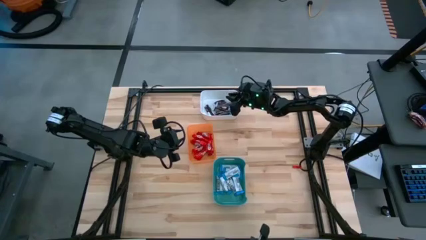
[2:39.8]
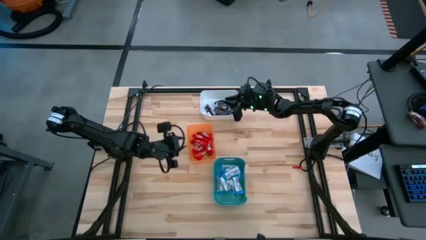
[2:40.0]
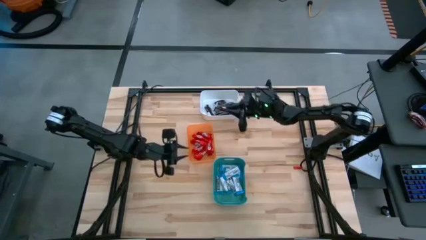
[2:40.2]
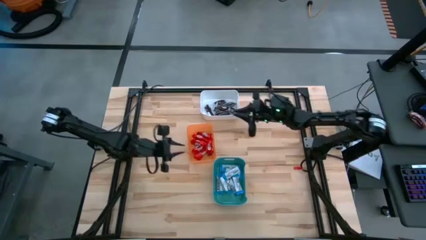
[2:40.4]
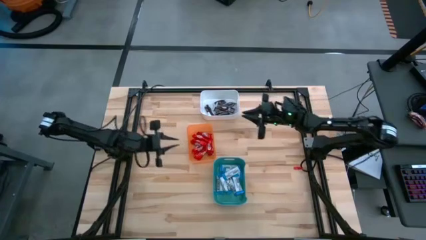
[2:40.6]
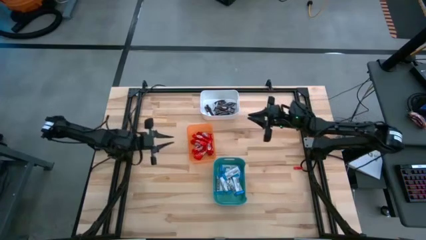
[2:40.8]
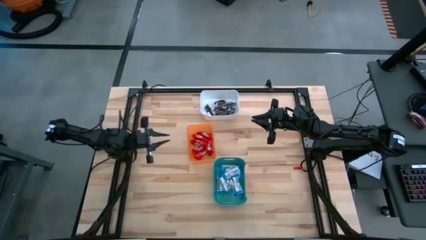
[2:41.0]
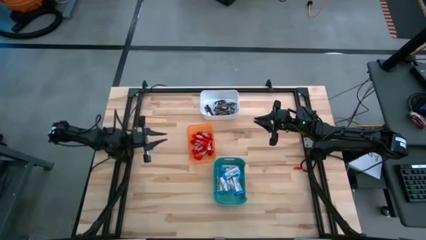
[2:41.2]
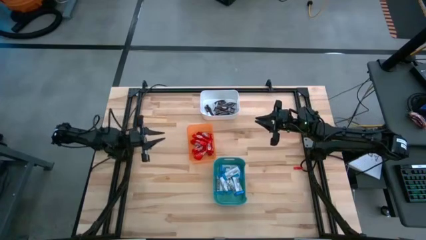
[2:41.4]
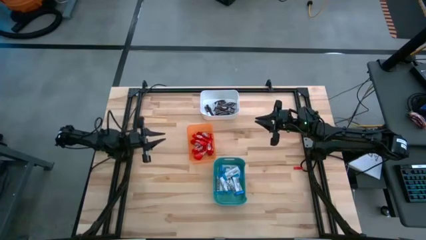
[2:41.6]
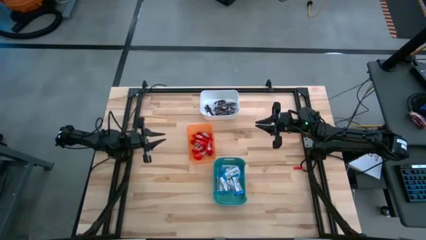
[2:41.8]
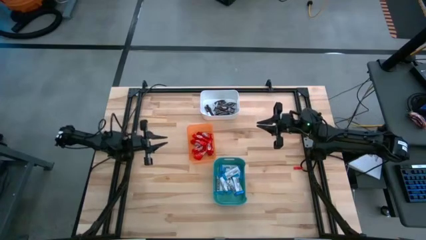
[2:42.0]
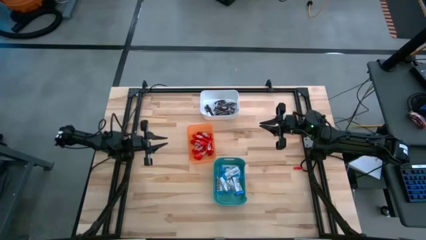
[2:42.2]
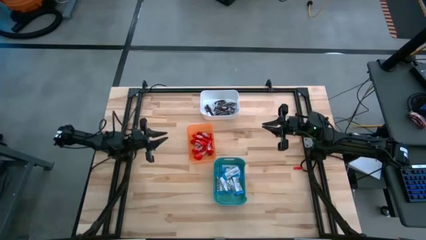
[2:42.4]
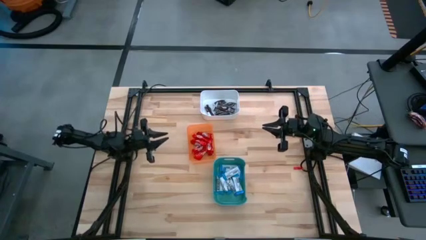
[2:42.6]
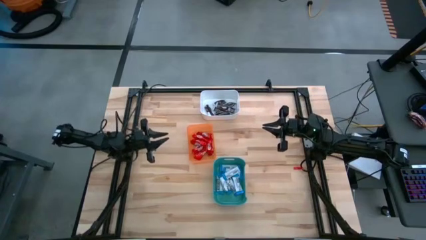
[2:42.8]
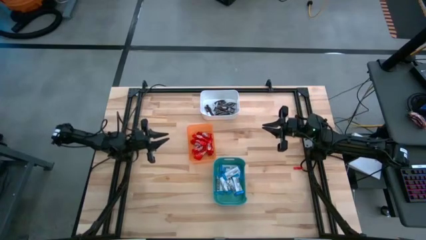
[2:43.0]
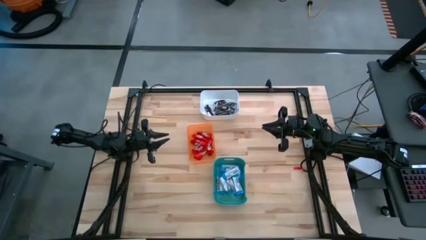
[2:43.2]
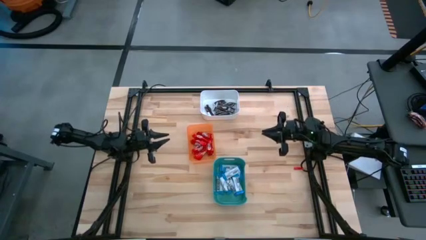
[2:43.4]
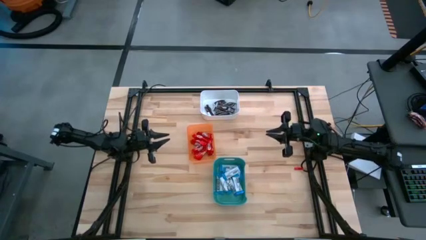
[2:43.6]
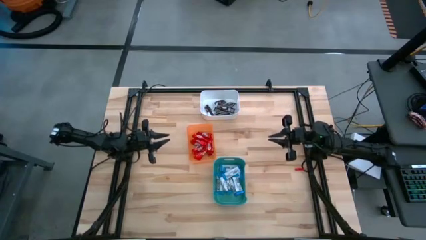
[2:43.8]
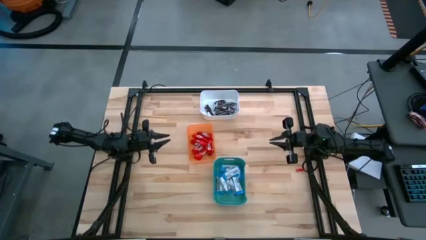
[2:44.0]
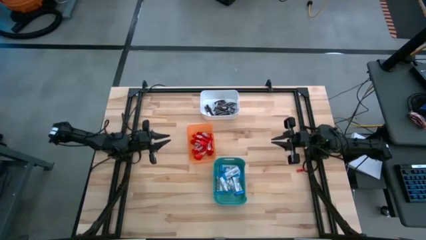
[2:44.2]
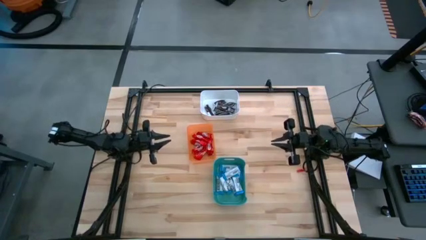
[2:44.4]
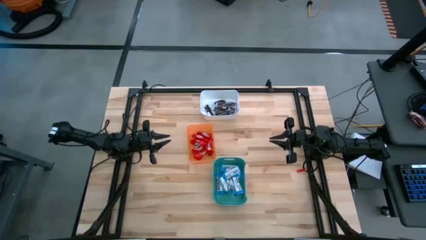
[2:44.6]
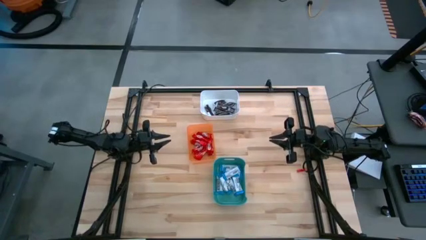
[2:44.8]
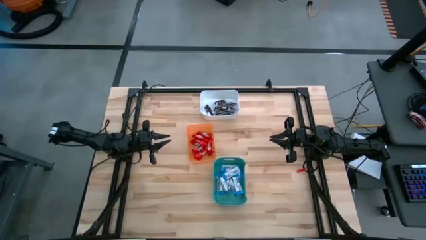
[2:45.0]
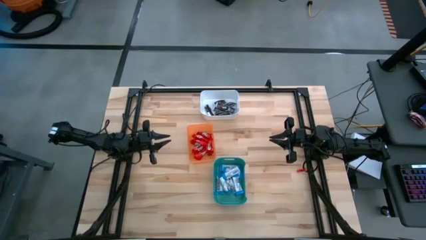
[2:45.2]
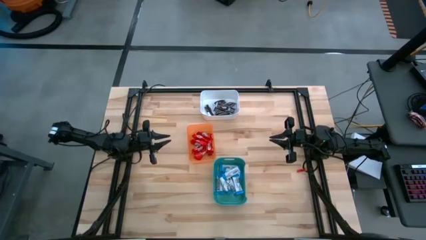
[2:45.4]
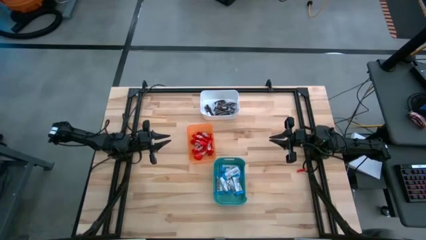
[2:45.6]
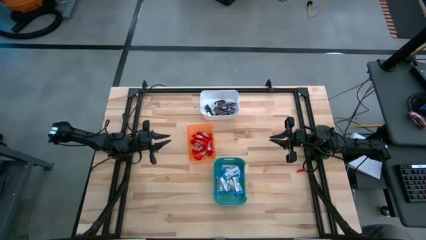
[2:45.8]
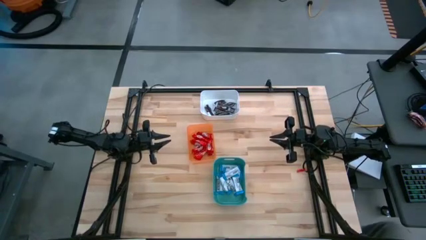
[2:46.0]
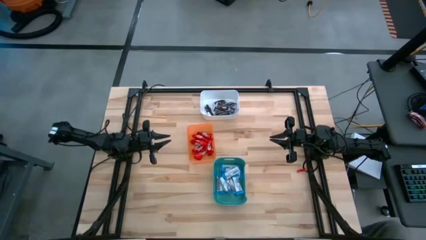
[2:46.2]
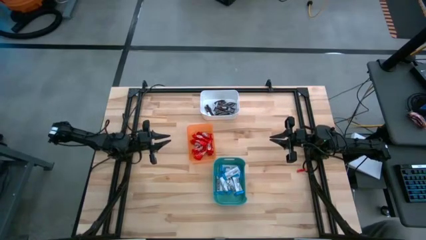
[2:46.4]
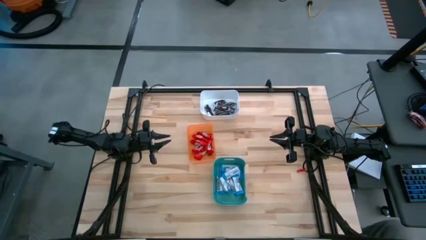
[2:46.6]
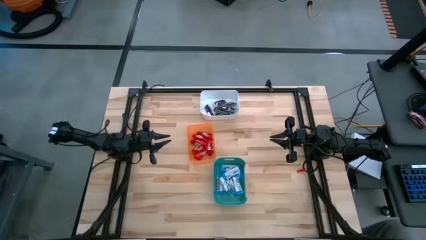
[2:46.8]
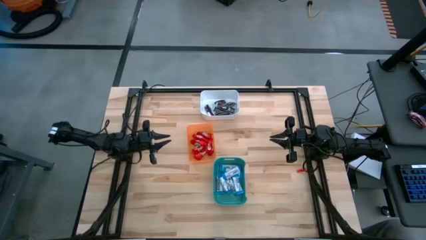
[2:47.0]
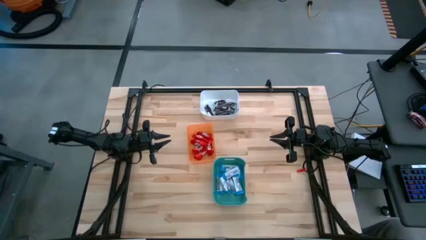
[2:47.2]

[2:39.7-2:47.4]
Task: Sort candy
Return to Home Position

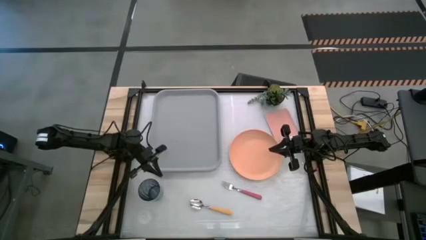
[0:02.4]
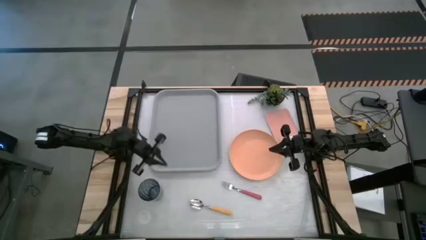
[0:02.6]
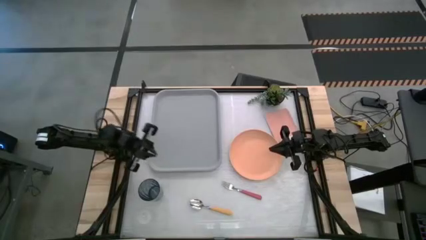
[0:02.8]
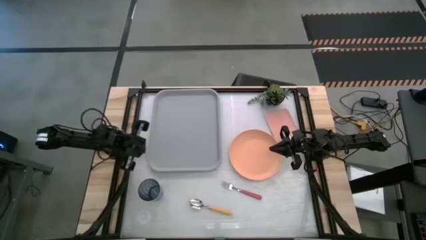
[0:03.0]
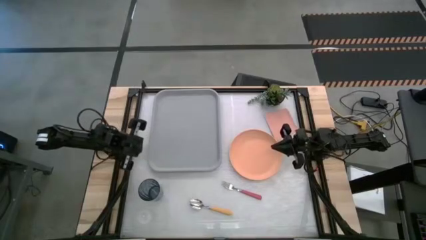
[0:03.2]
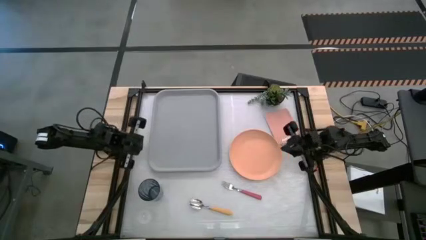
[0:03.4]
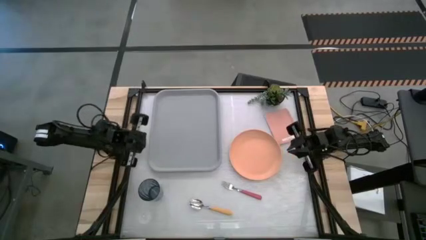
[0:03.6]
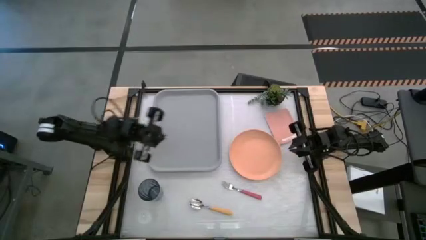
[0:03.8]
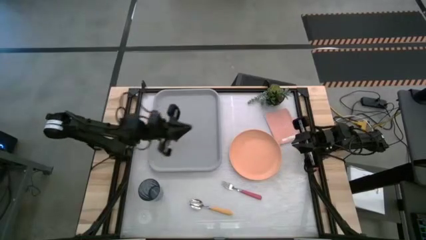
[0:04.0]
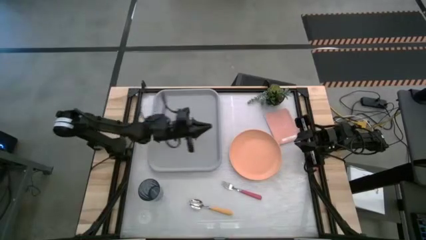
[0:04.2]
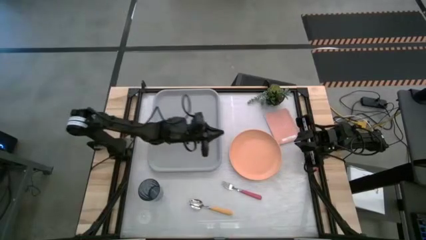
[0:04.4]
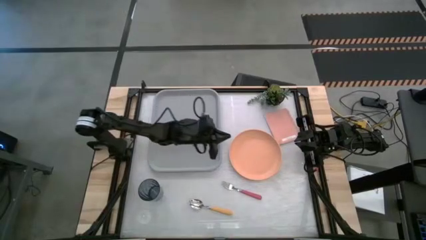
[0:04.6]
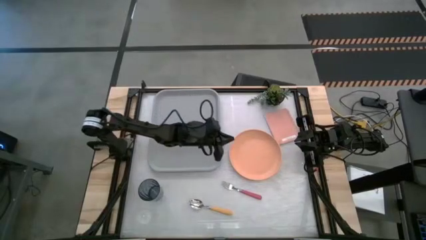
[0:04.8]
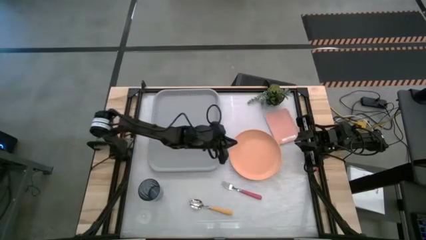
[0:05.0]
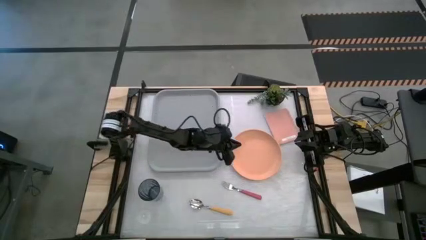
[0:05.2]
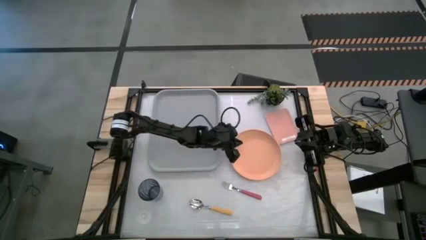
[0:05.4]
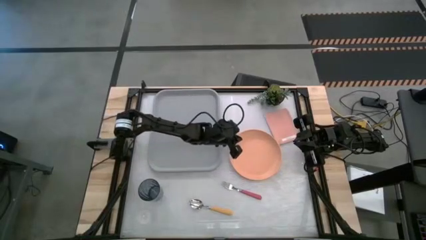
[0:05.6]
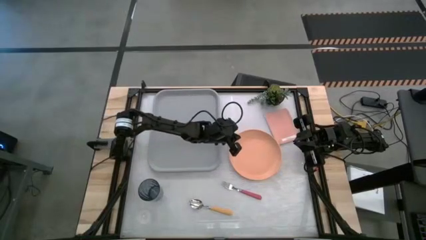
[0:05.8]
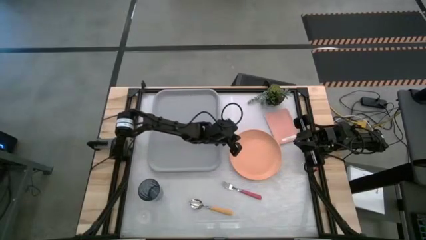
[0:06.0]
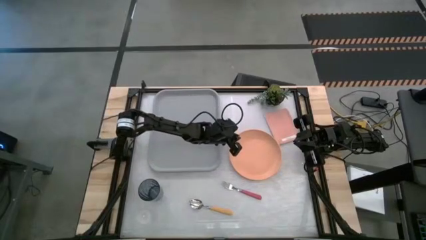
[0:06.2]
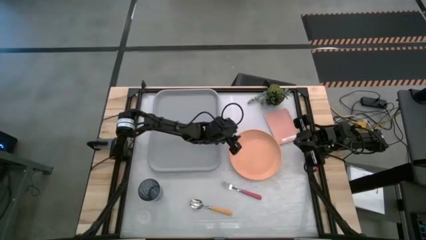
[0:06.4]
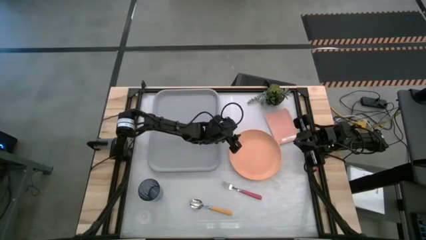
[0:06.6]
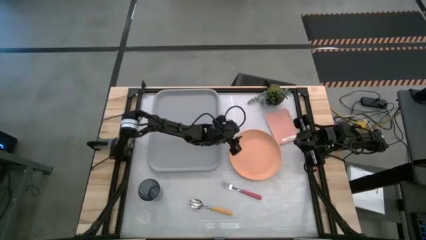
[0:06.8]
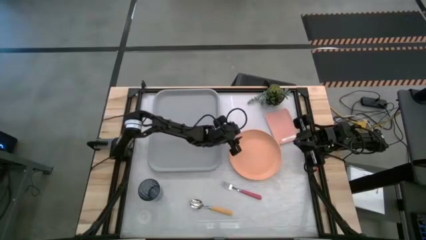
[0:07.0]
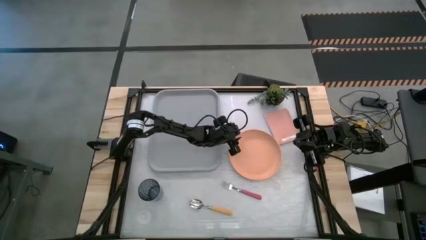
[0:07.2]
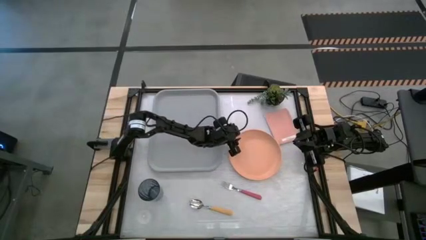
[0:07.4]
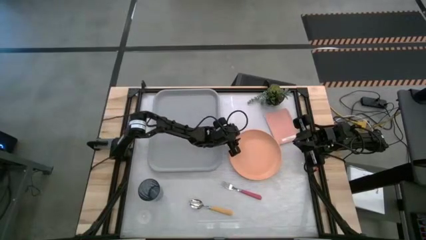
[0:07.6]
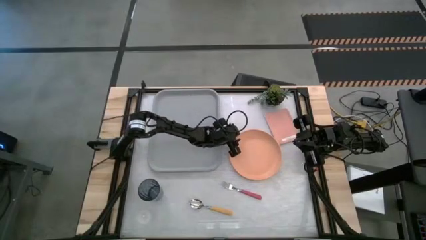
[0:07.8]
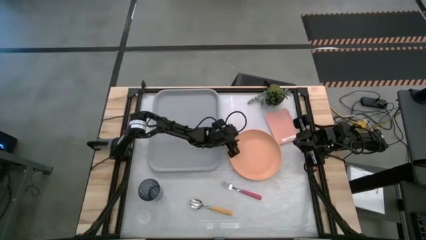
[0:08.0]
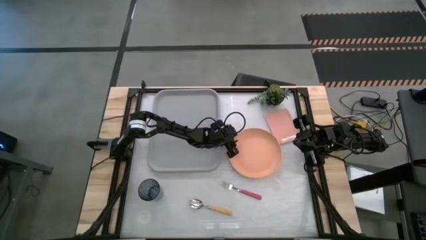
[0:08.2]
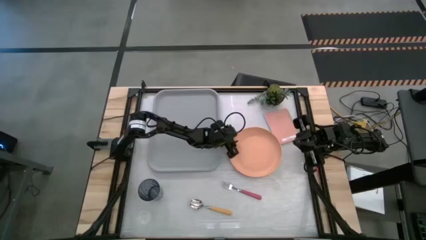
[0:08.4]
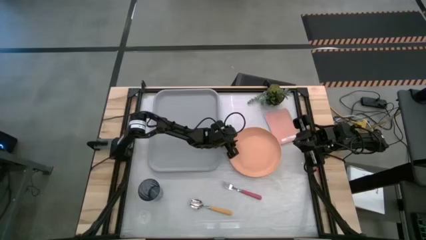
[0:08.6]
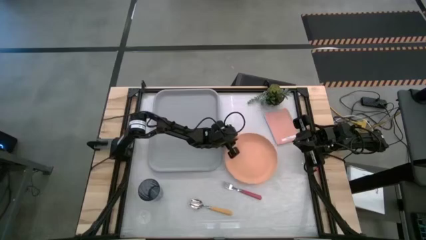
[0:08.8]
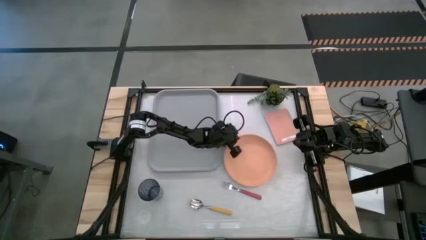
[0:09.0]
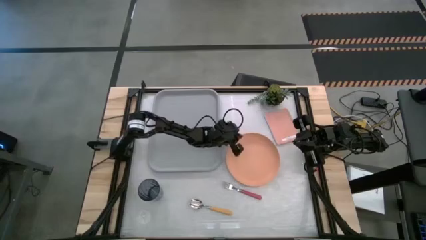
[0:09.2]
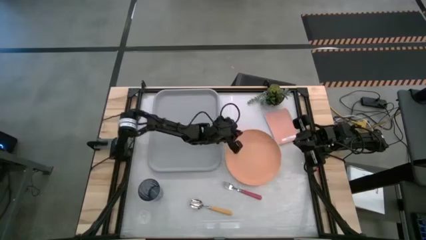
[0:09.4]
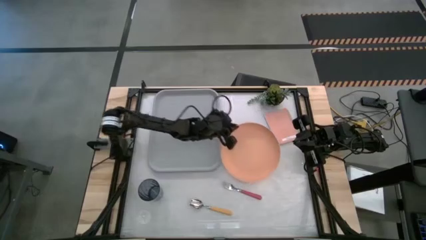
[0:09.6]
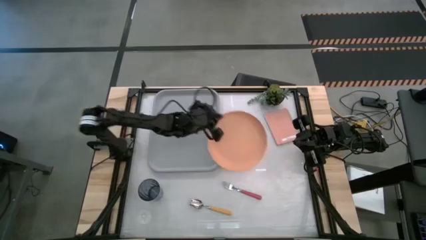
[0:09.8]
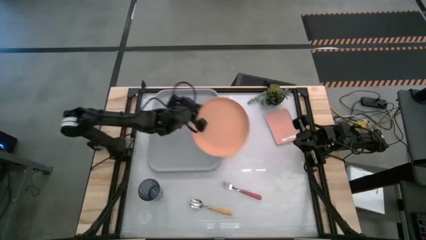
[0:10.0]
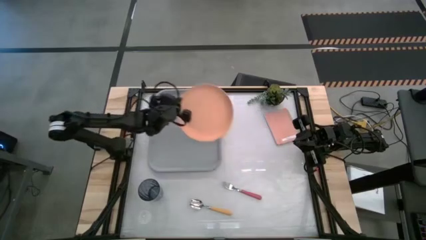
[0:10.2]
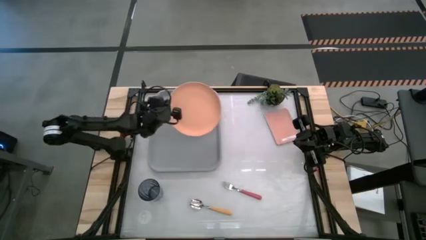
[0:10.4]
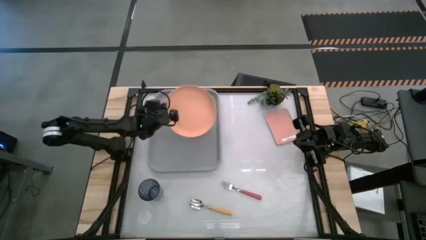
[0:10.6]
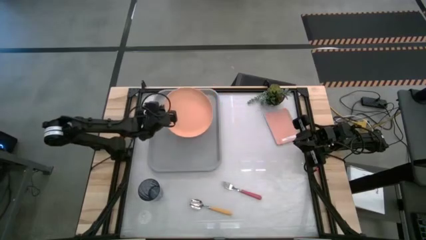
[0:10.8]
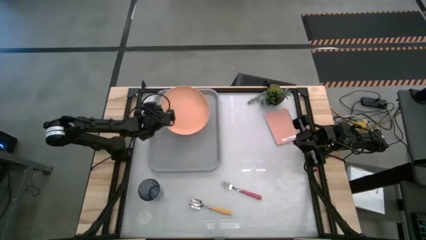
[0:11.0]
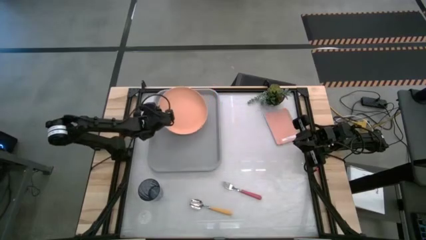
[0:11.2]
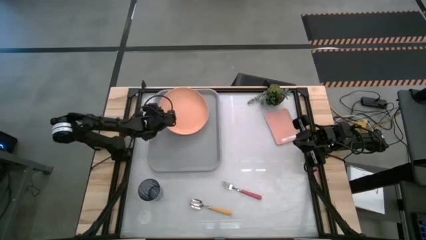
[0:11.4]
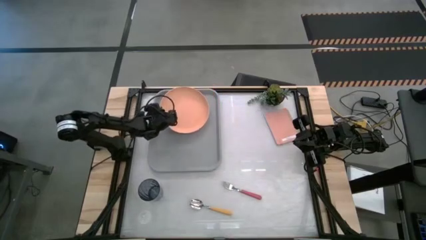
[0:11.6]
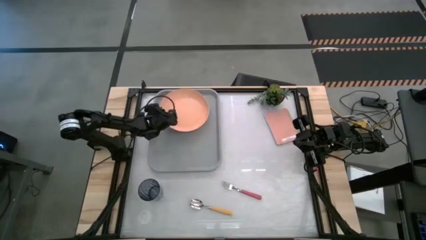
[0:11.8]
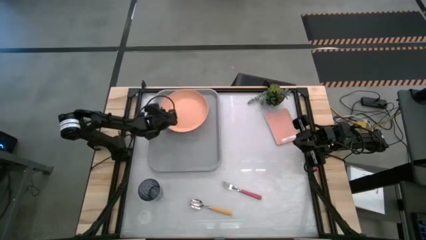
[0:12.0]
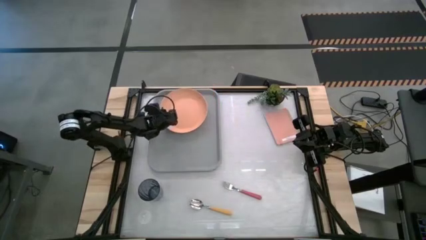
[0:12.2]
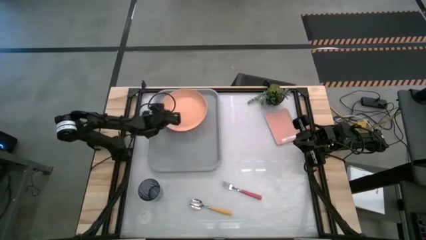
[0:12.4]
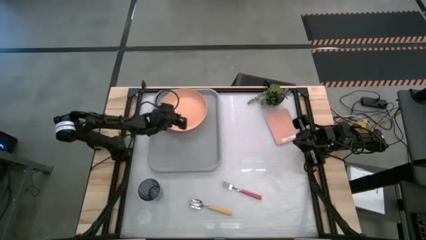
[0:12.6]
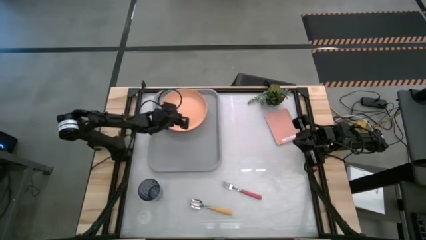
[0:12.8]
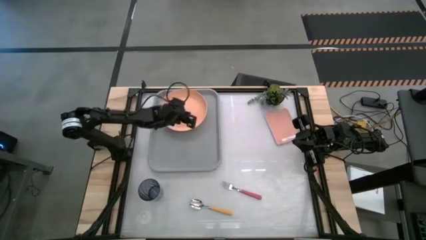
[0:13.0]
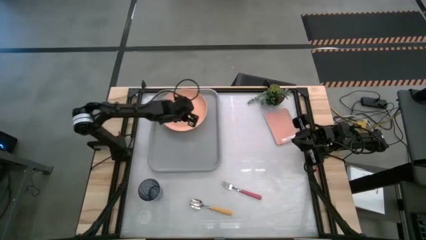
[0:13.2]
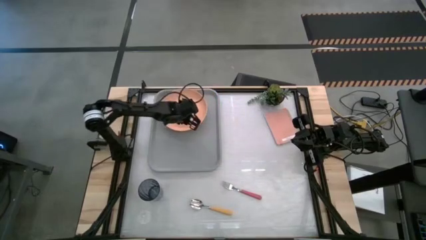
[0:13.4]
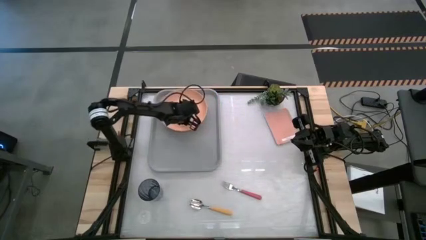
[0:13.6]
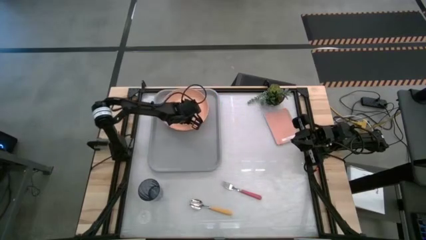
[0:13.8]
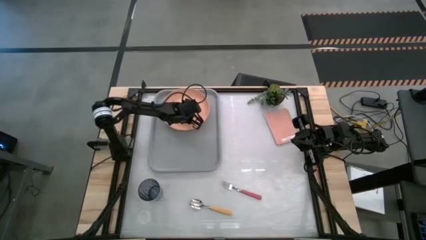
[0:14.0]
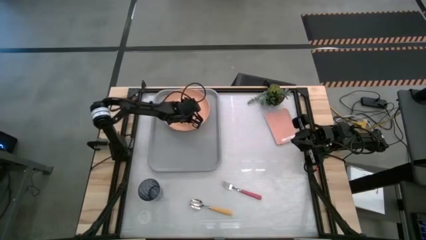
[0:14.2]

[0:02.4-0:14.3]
Task: Pick and place plate/cup/fork/spoon on tray
Put the orange plate on the gray serving tray
